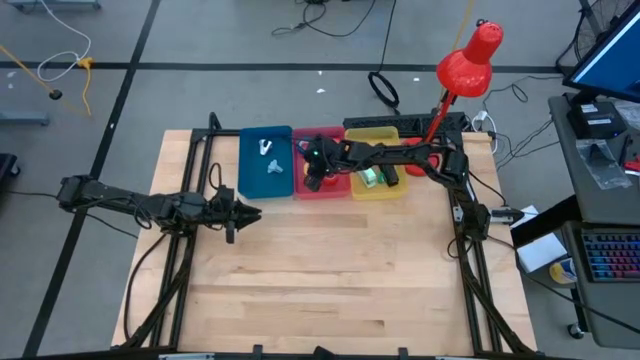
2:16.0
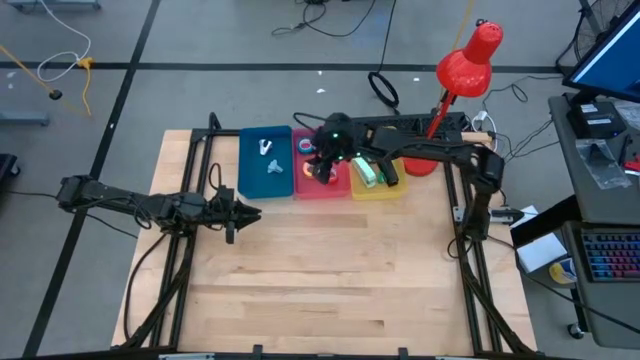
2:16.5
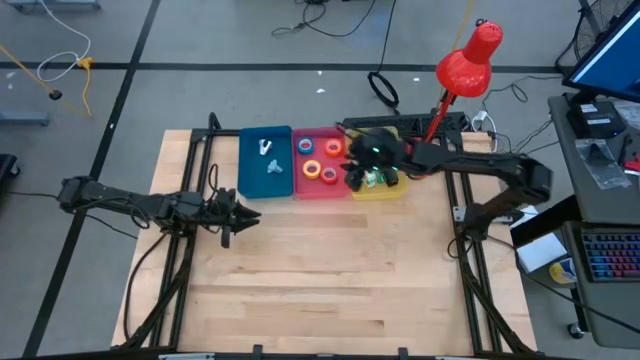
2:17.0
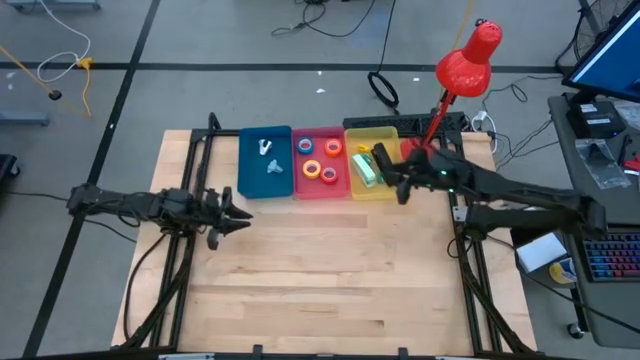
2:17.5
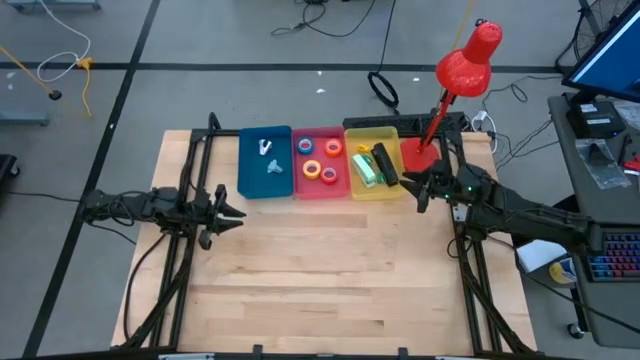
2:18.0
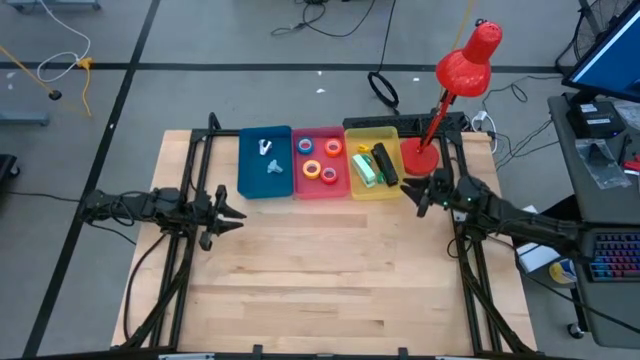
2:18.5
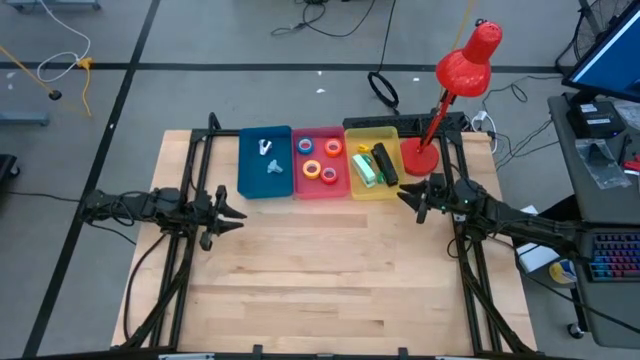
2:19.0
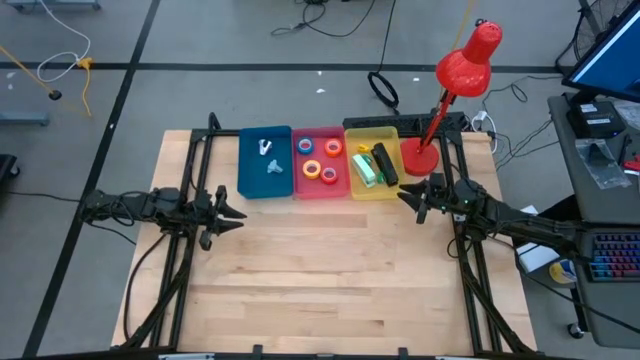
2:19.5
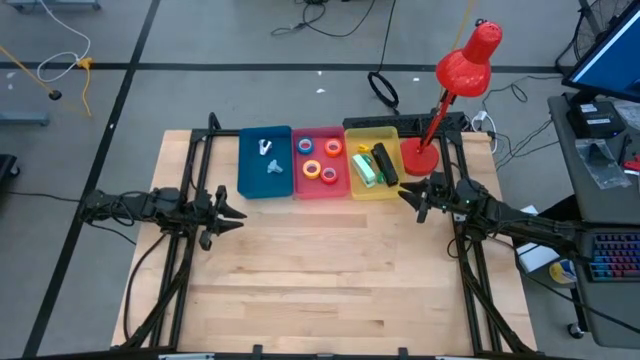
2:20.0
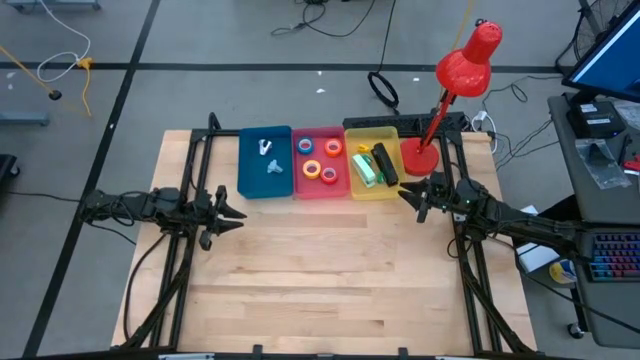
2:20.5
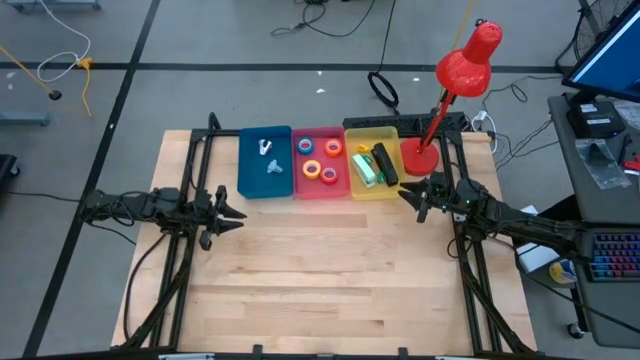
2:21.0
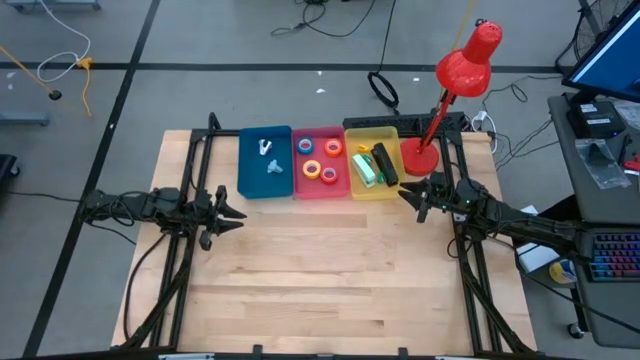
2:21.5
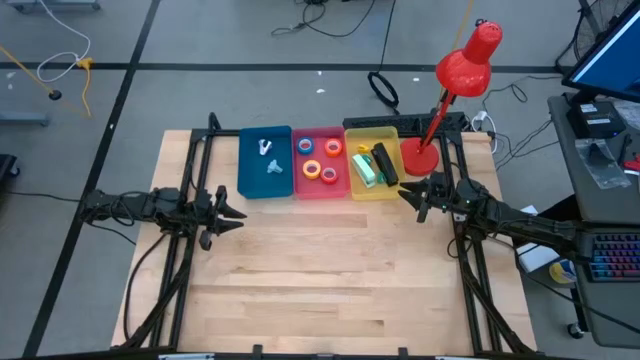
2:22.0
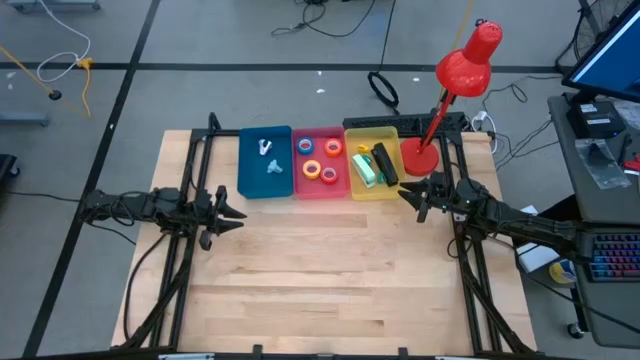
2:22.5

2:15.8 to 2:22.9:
Task: Pick and place Stapler, Stapler remover, tape
Return to Home Position

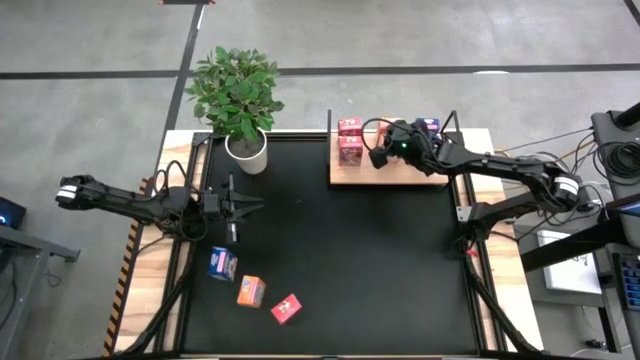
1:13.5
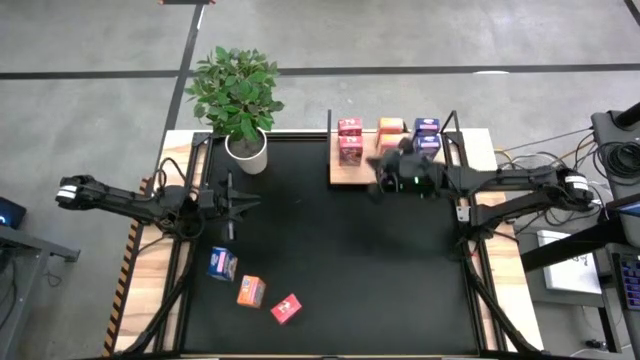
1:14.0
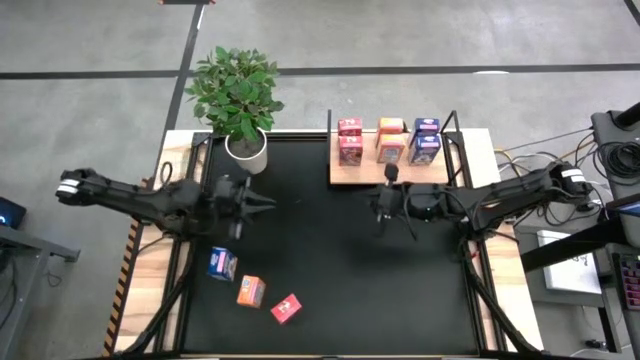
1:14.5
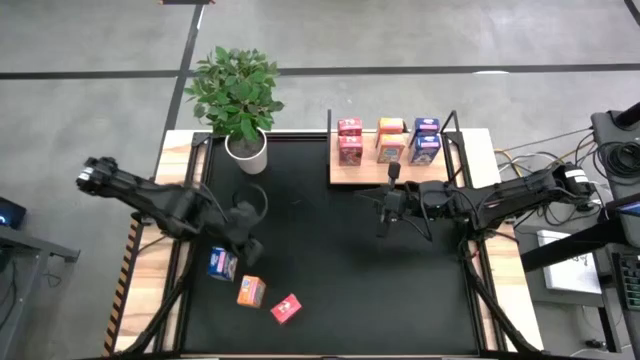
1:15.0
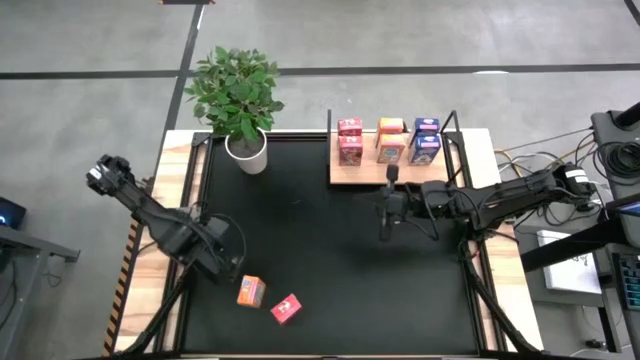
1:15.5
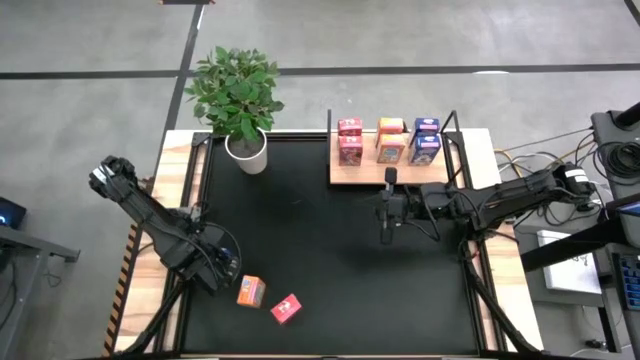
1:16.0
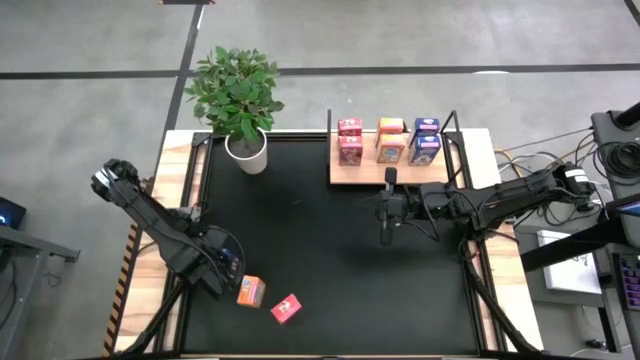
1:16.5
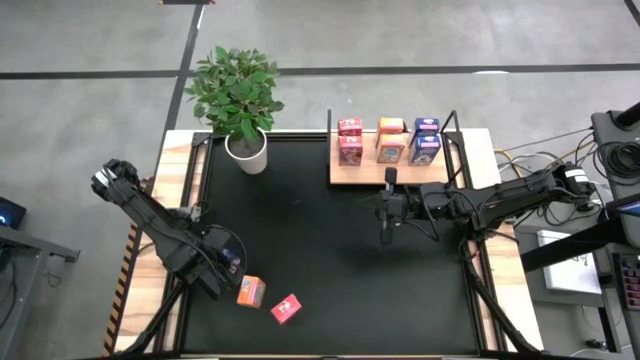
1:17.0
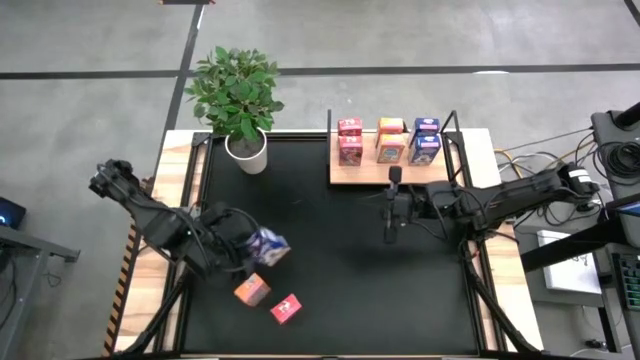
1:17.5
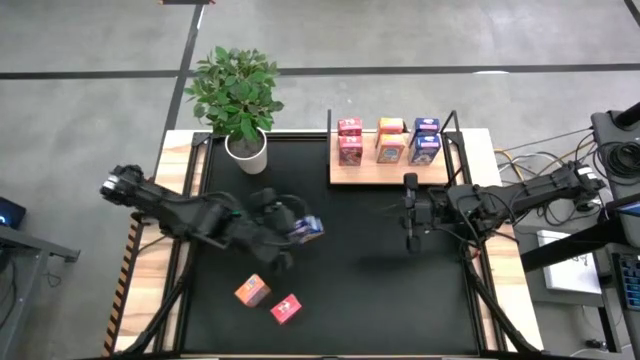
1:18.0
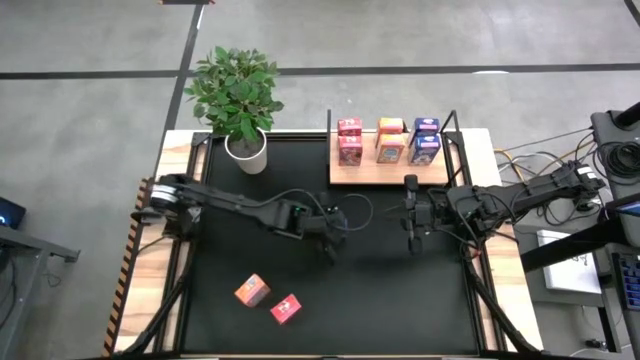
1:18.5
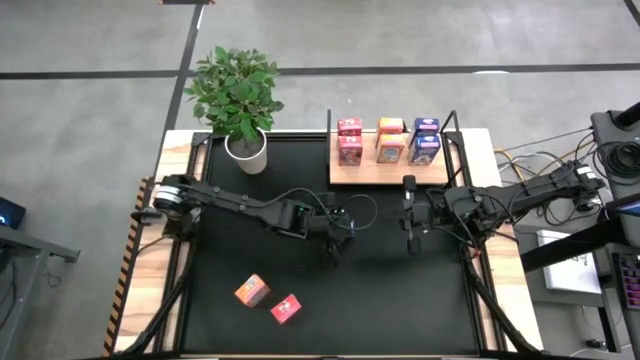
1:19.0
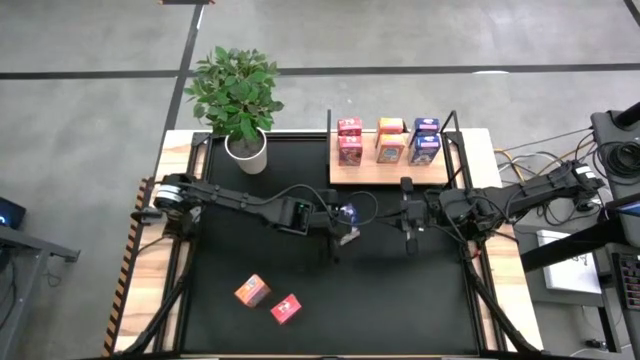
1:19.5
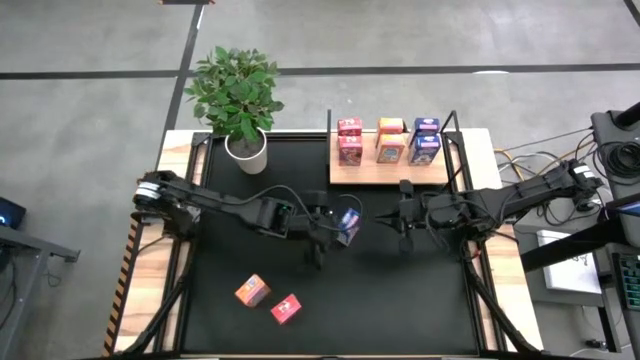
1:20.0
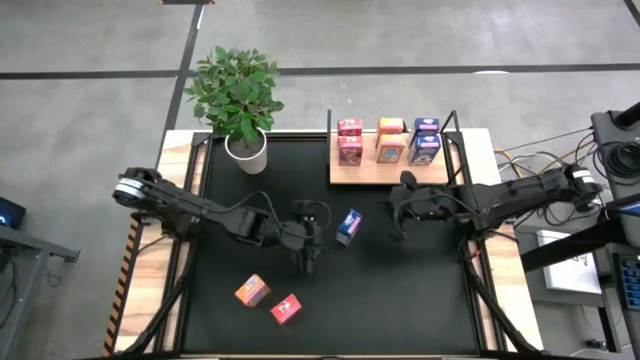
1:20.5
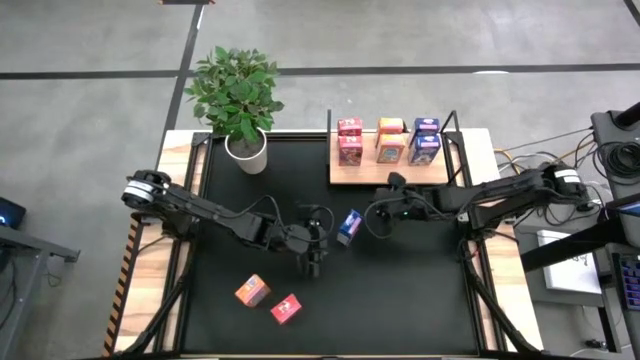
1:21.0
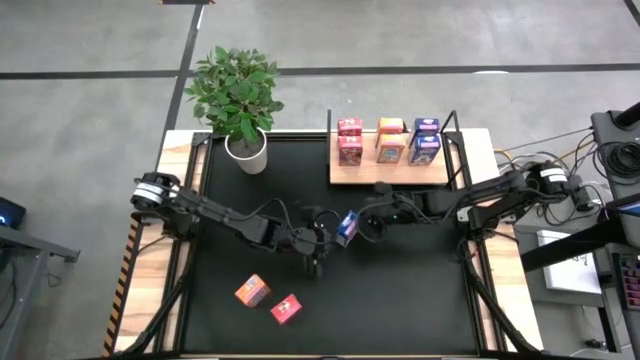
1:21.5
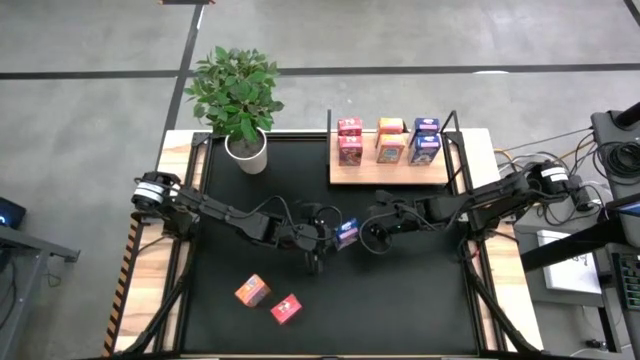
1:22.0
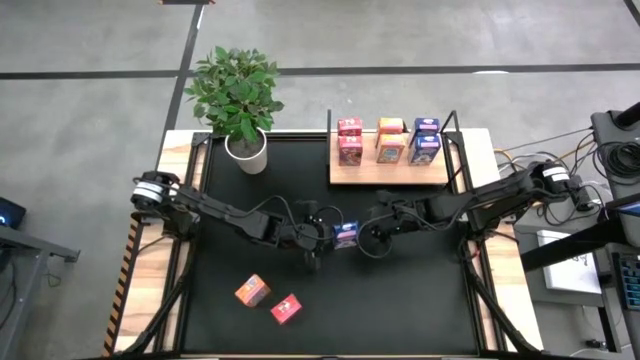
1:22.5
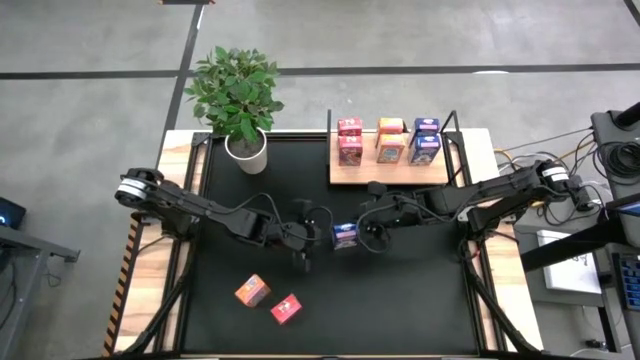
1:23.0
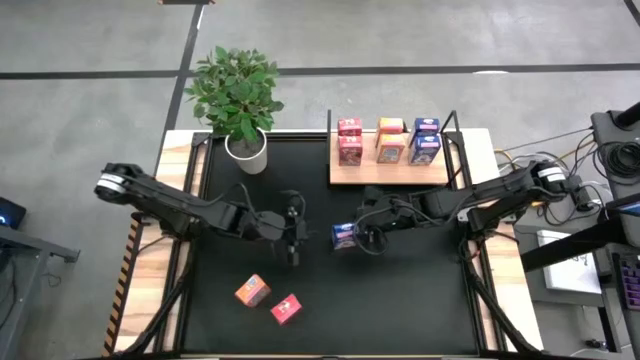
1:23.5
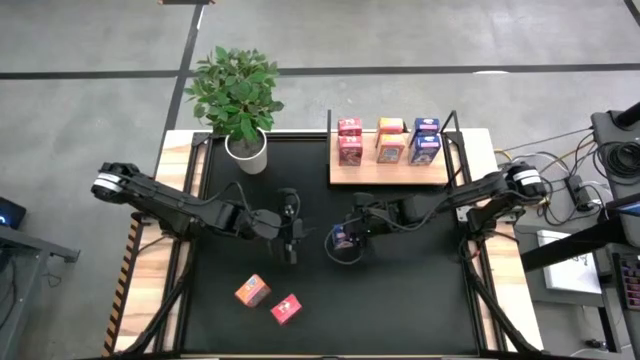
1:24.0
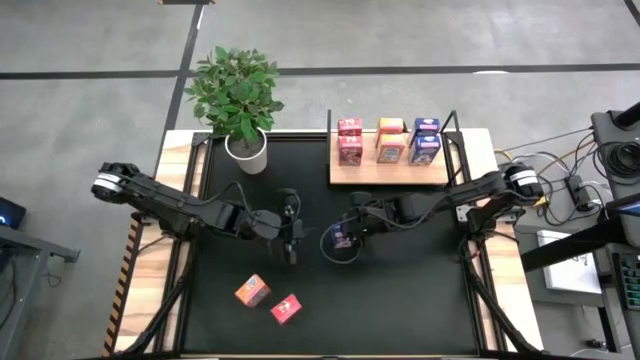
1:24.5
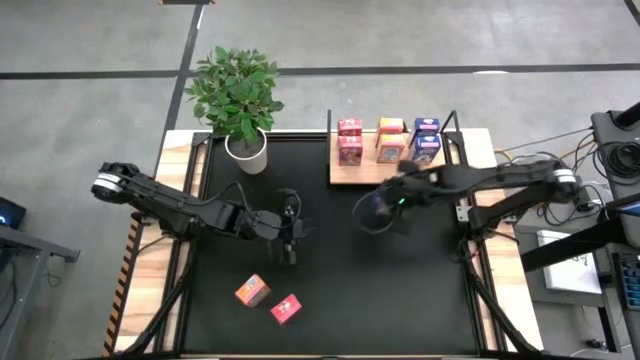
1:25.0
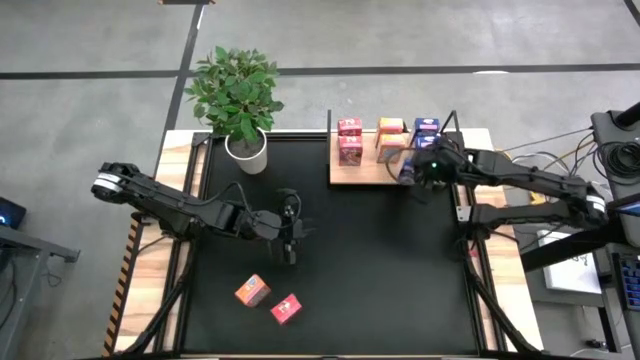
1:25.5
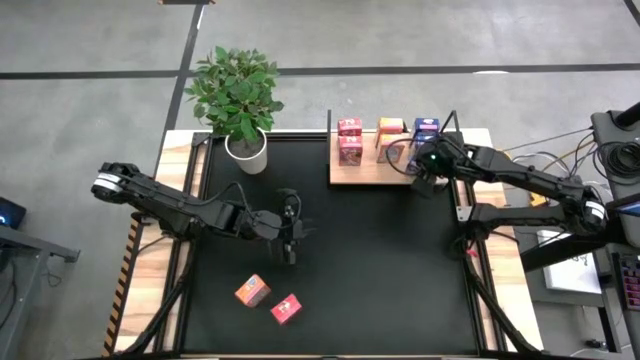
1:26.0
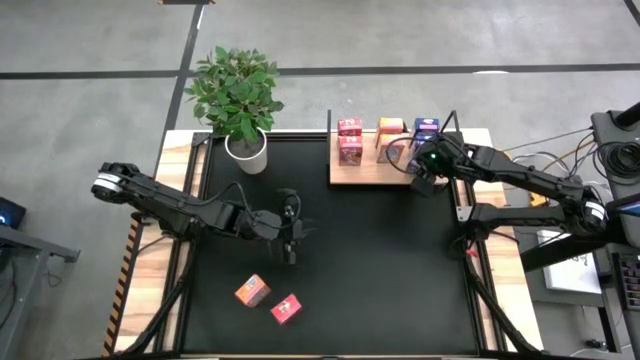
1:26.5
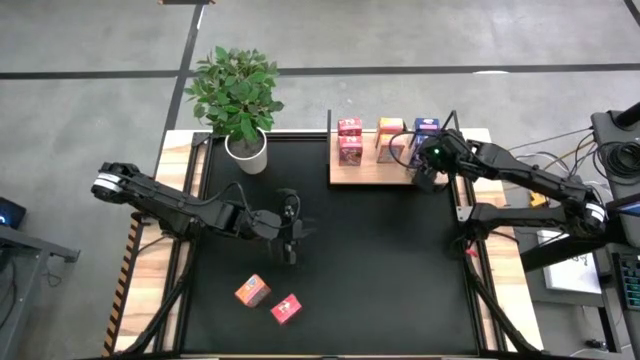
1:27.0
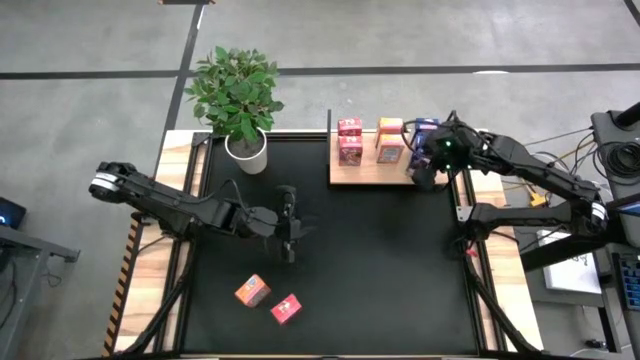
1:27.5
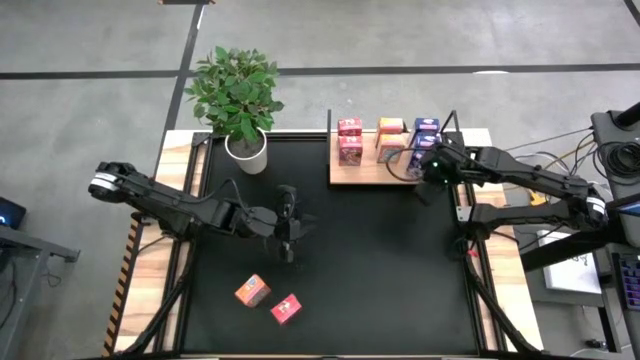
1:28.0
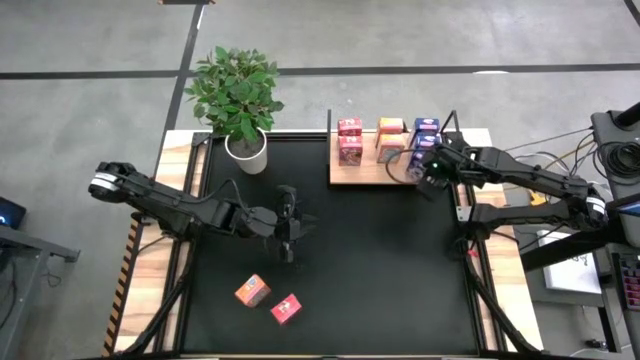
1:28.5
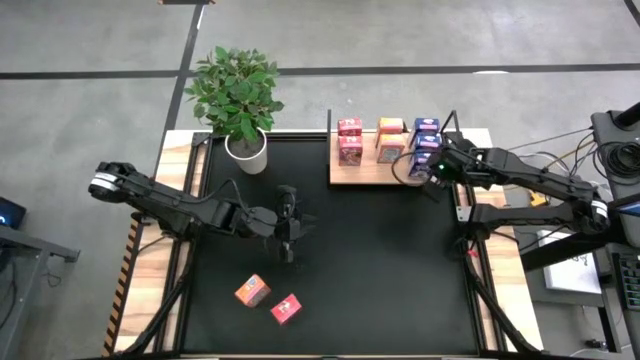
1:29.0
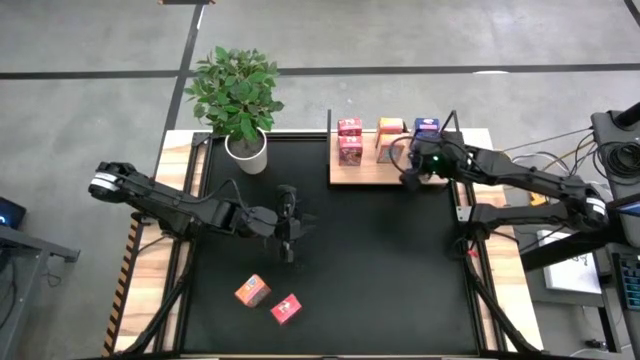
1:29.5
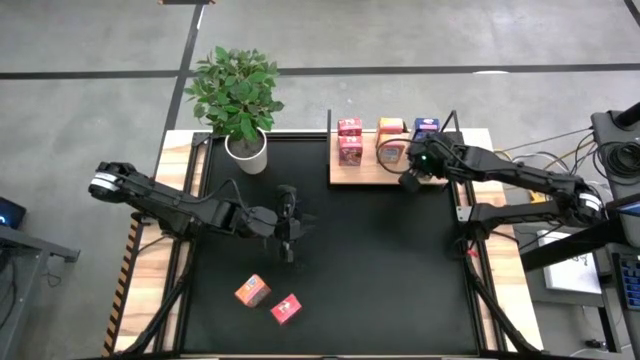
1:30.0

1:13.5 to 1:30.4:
Task: Stack cereal on shelf
Put the blue cereal box on the shelf aligned with the other blue cereal box
